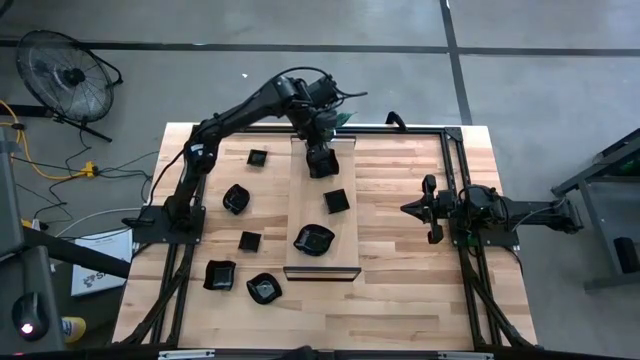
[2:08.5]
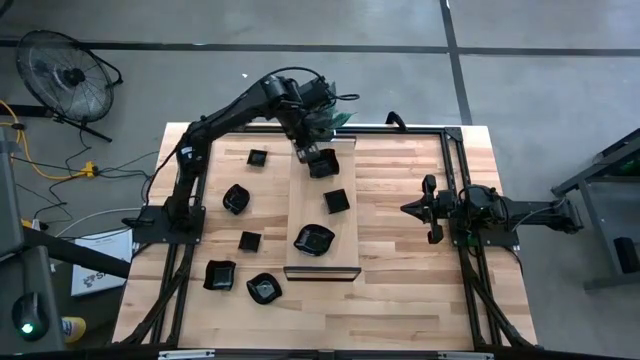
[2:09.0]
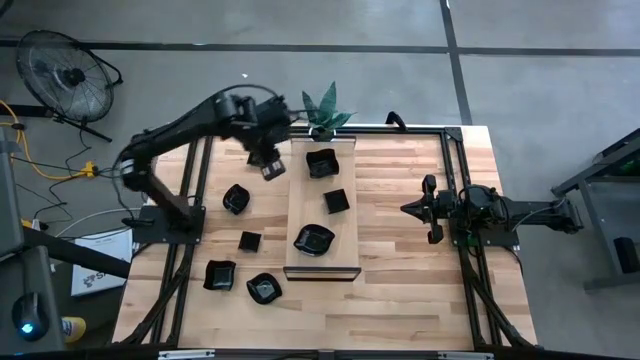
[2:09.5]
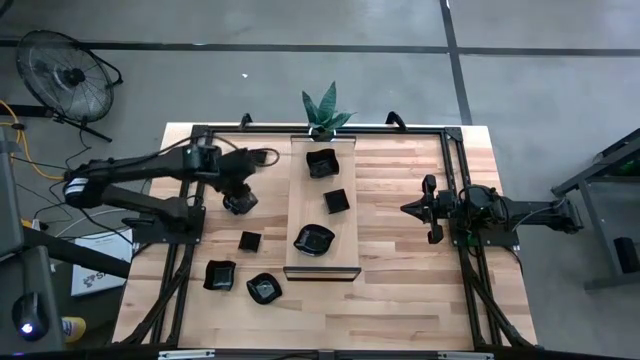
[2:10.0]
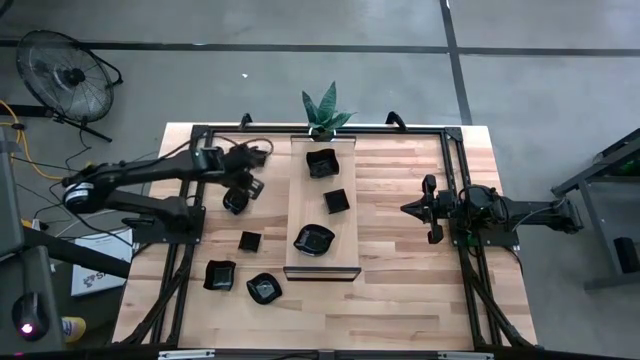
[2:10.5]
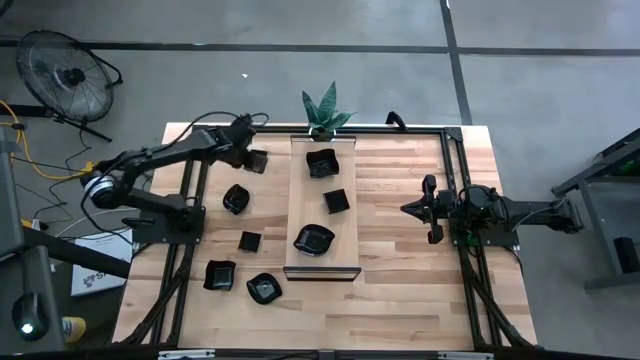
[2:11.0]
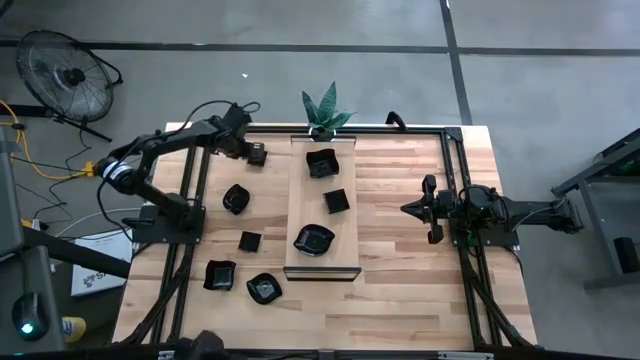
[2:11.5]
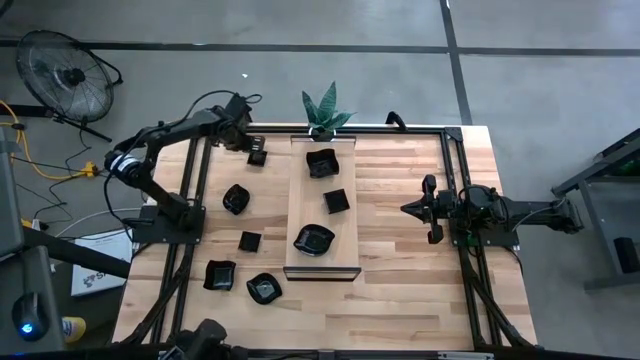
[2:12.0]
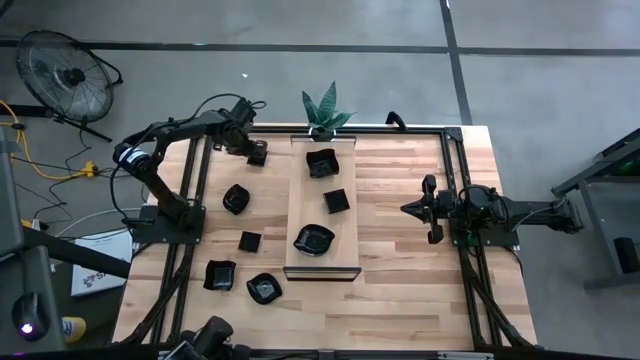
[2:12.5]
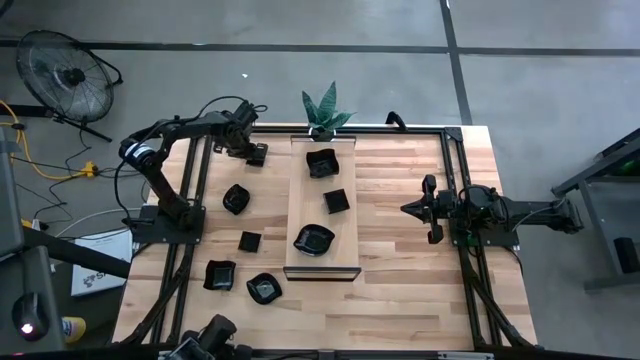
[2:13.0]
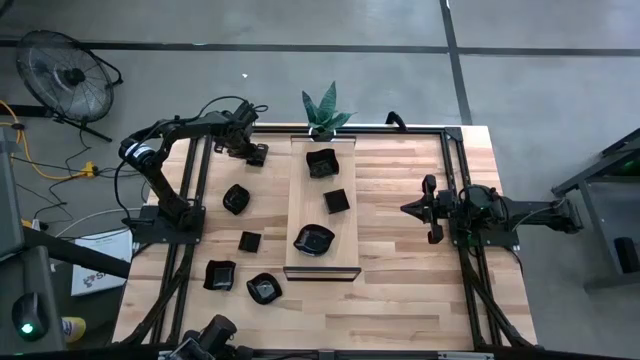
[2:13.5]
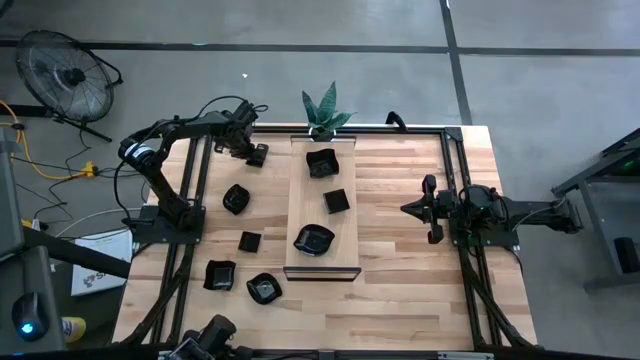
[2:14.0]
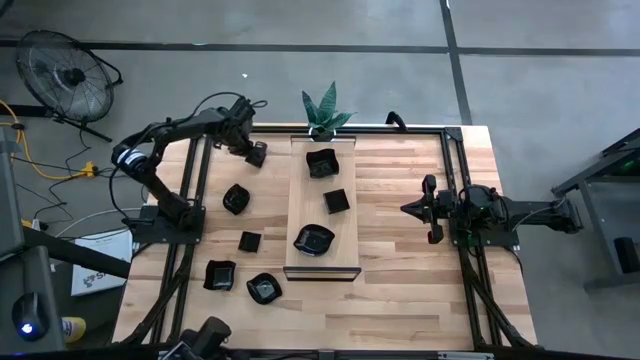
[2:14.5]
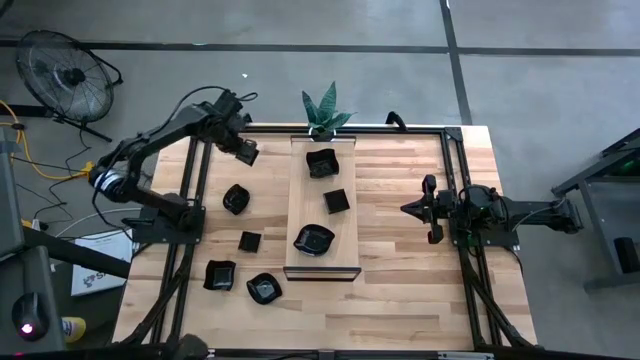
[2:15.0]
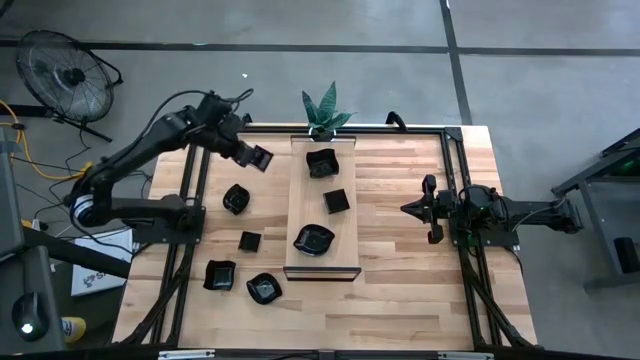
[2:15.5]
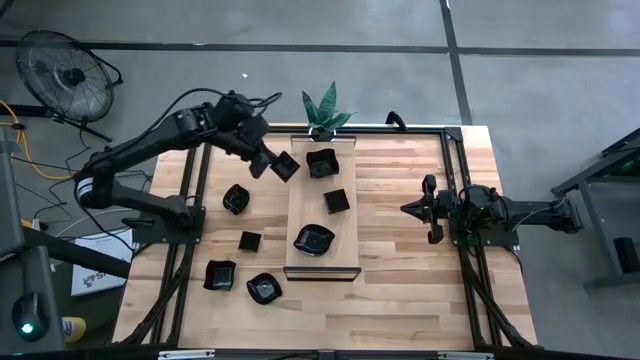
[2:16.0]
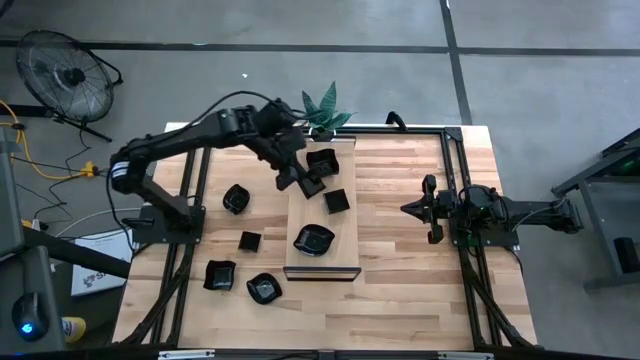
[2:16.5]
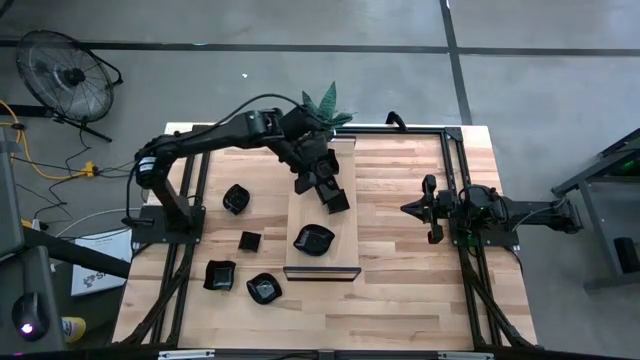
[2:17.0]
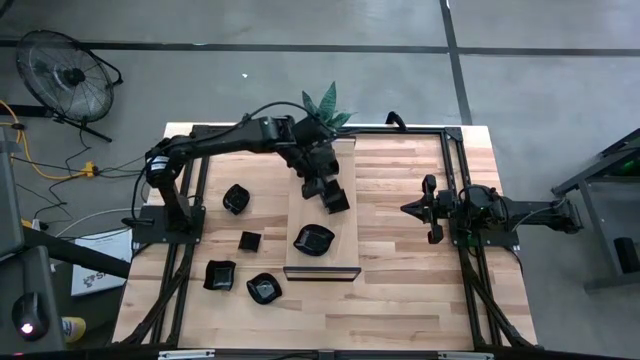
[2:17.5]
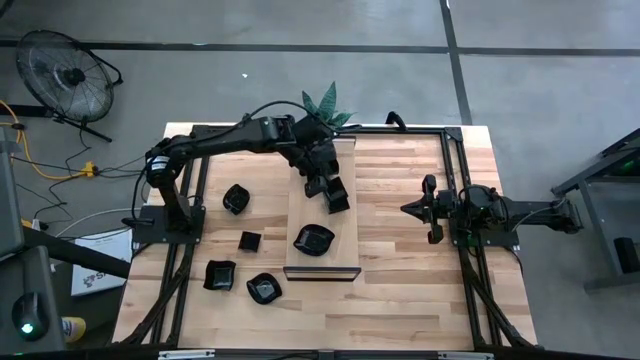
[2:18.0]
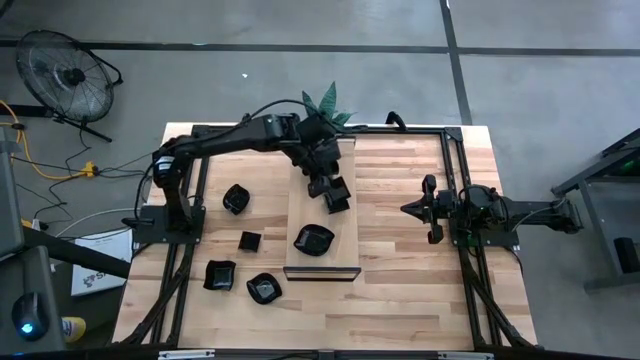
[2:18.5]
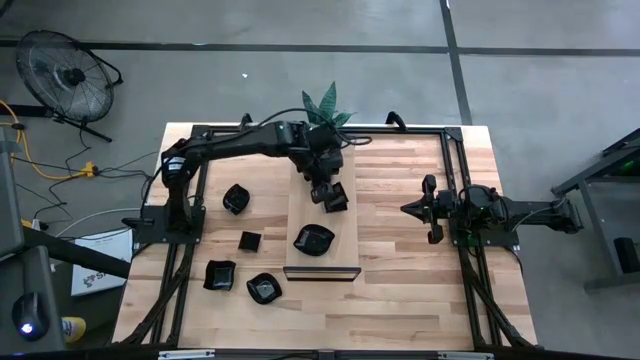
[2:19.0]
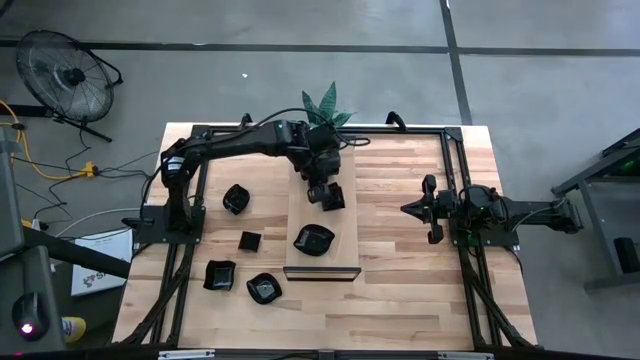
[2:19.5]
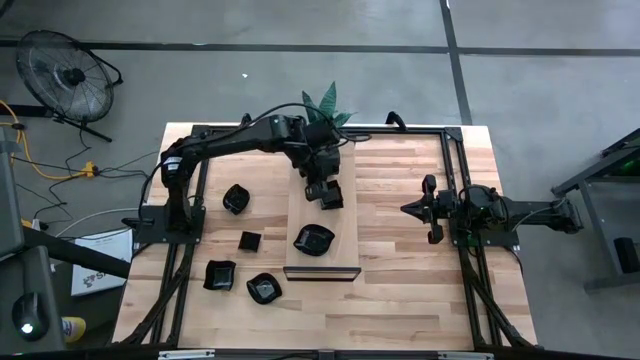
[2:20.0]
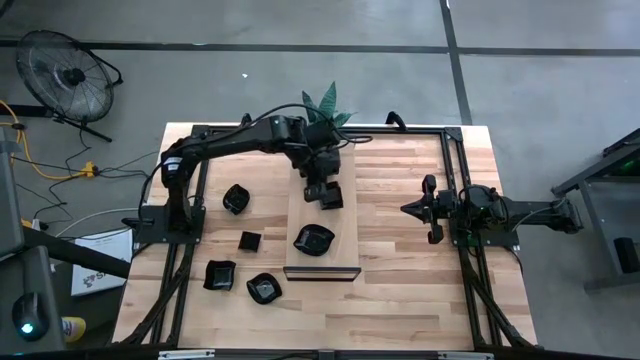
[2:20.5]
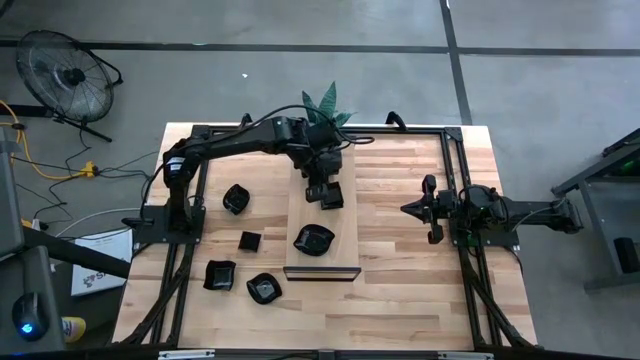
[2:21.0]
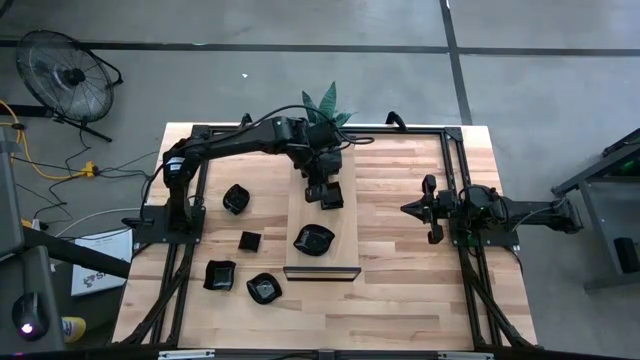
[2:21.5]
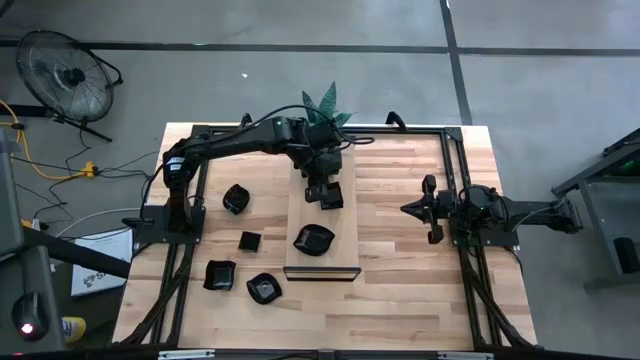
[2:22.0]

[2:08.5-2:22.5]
Task: Pick & Place Mini shaped plates
Stack the black square plate on top of the black square plate on the shelf

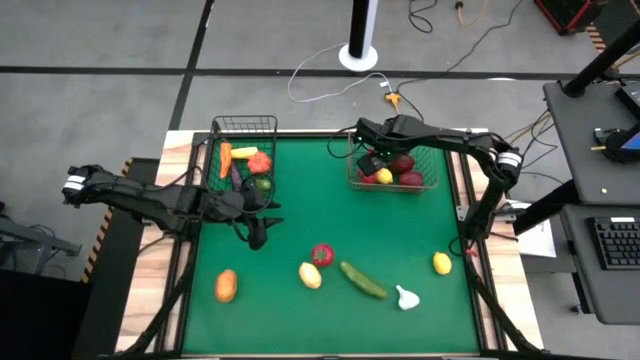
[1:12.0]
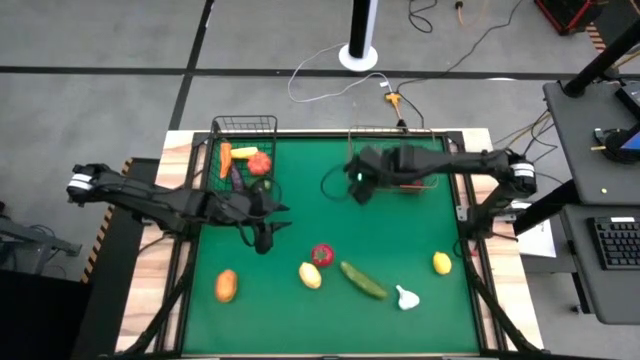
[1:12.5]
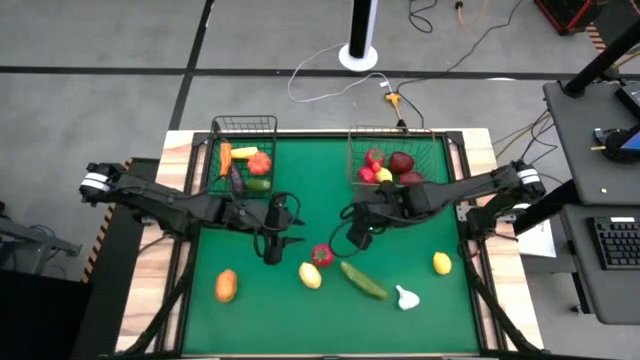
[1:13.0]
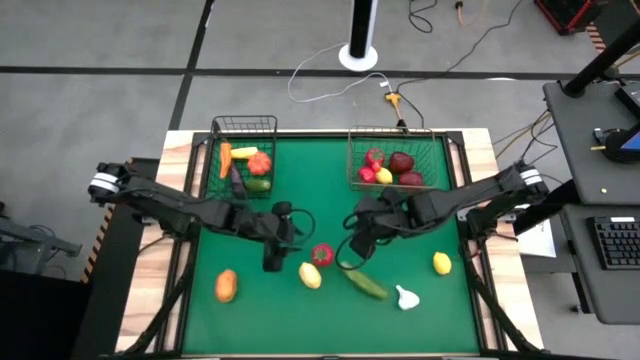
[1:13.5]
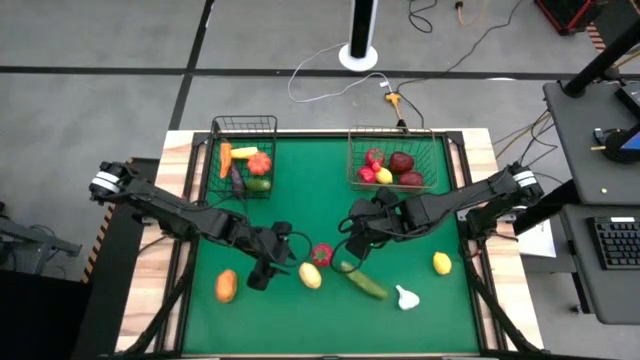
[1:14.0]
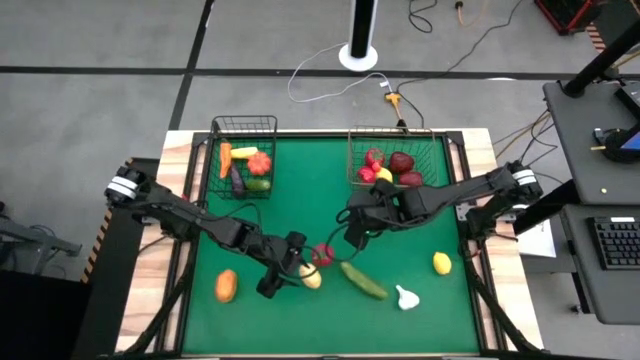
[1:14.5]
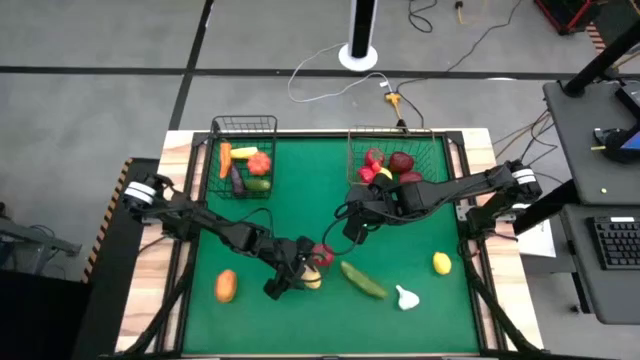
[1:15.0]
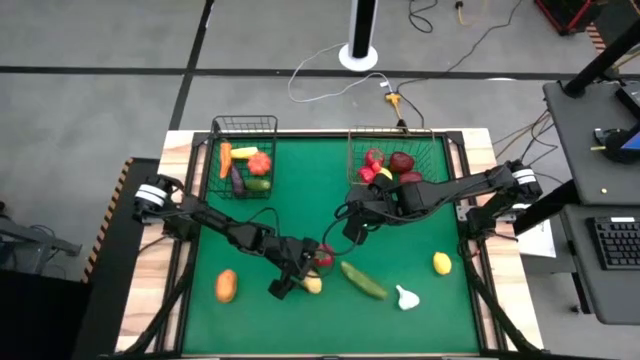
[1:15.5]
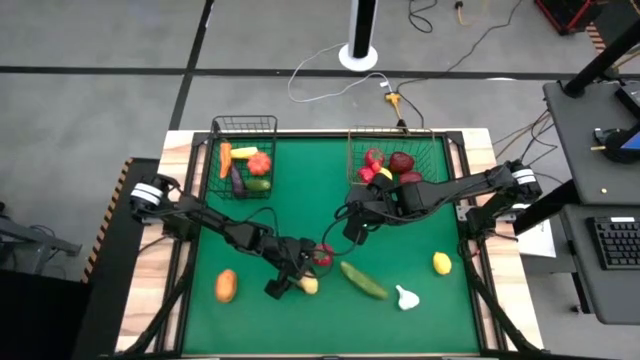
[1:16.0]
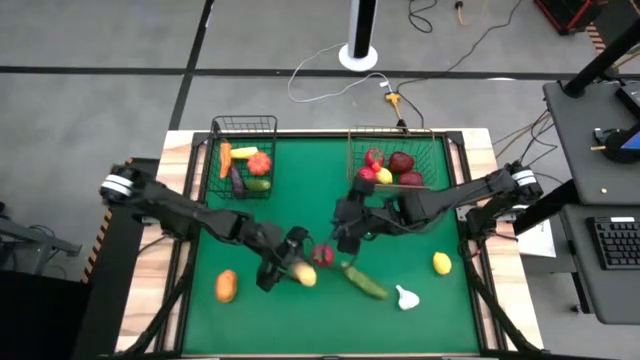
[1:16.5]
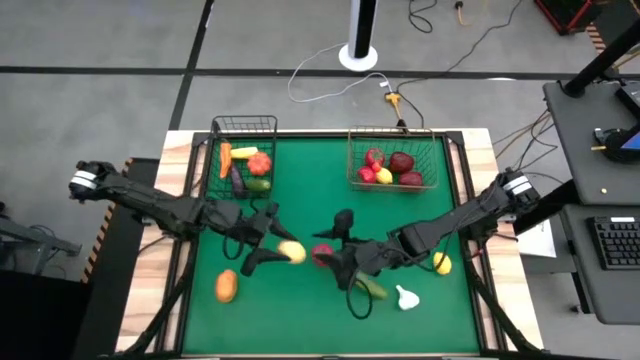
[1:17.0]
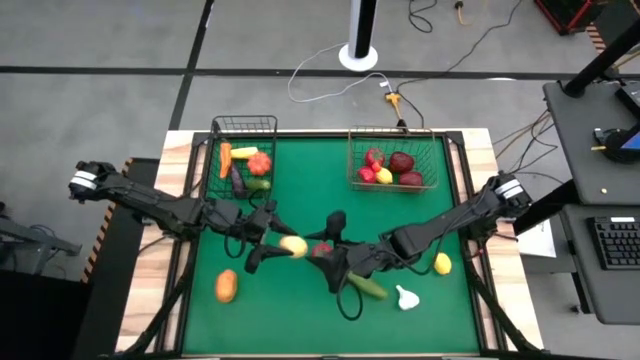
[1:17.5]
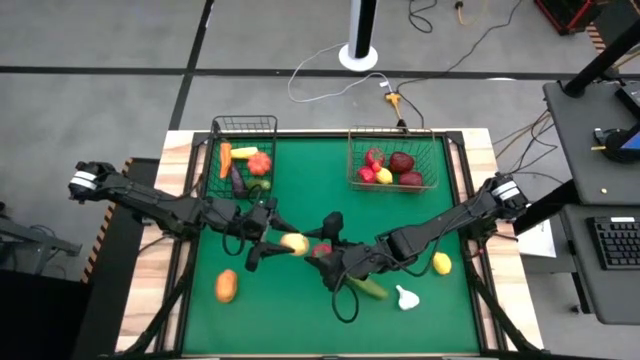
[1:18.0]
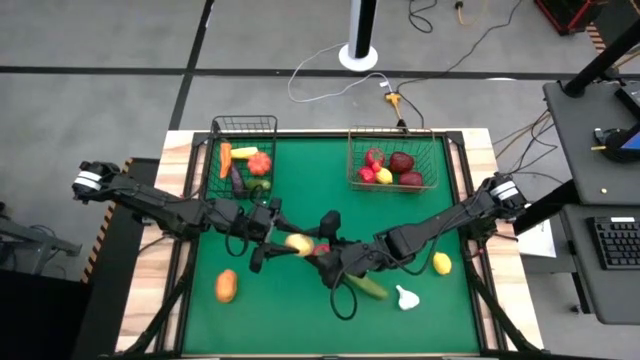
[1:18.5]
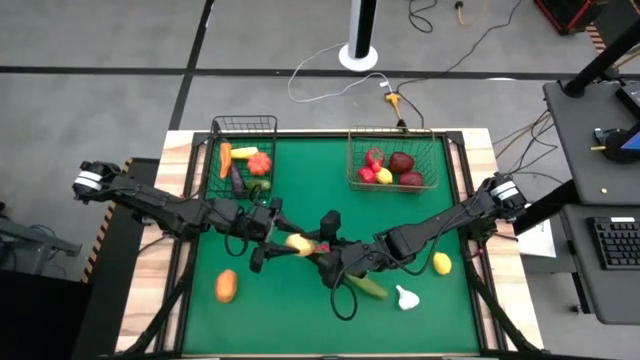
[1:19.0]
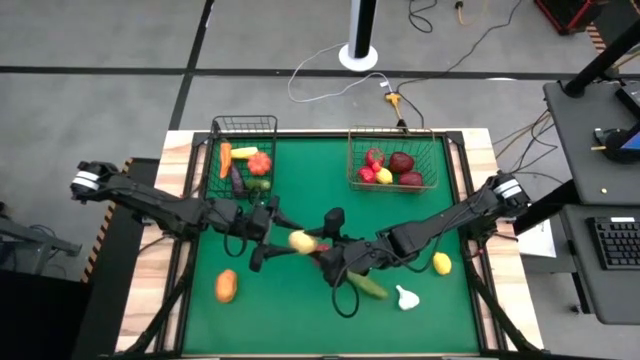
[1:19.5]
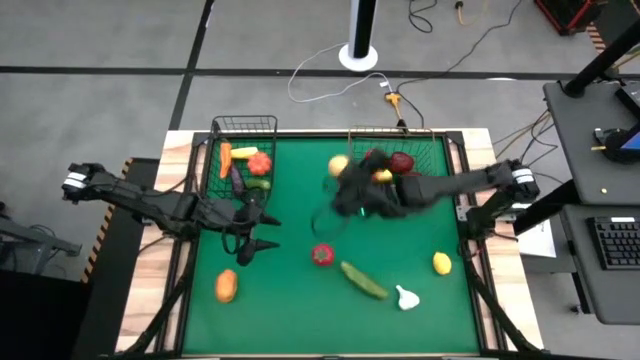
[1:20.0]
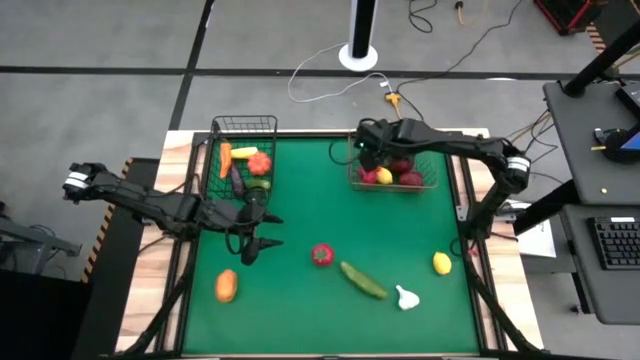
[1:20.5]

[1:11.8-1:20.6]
Task: Sort produce into baskets
Put the left yellow lemon into the right wire basket
